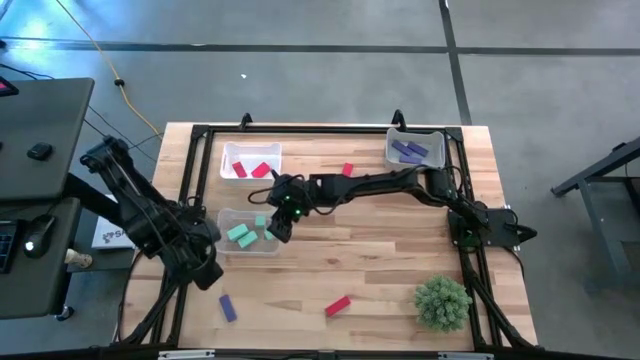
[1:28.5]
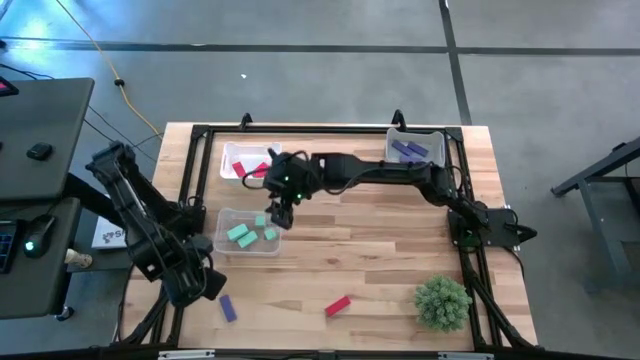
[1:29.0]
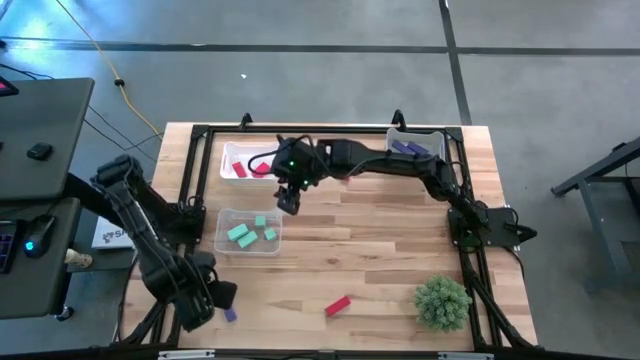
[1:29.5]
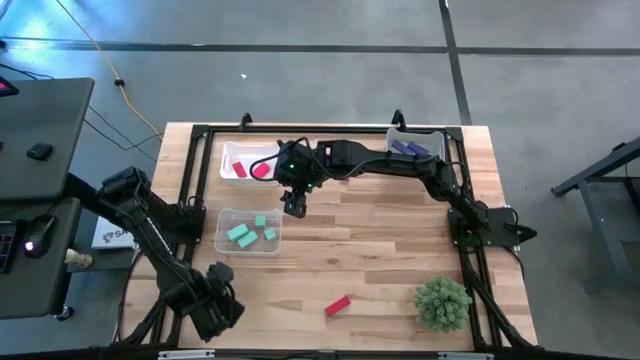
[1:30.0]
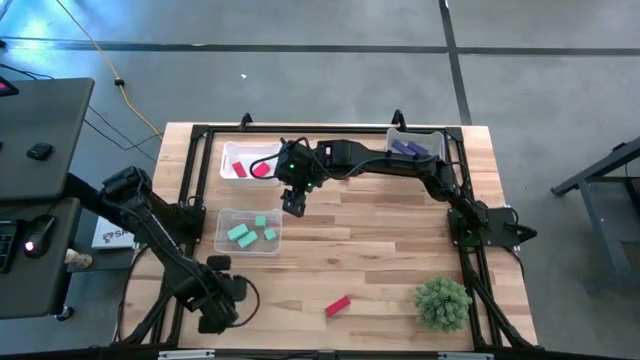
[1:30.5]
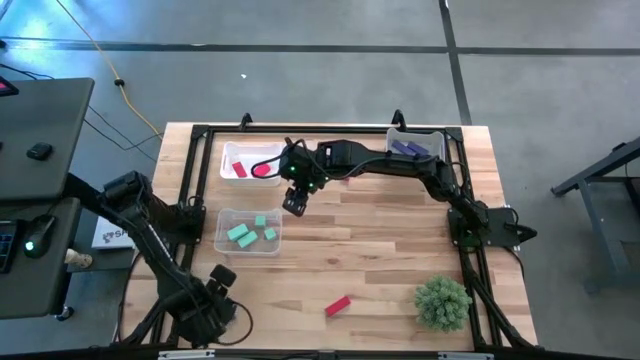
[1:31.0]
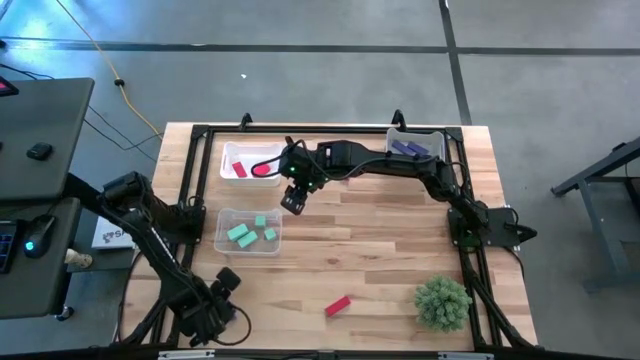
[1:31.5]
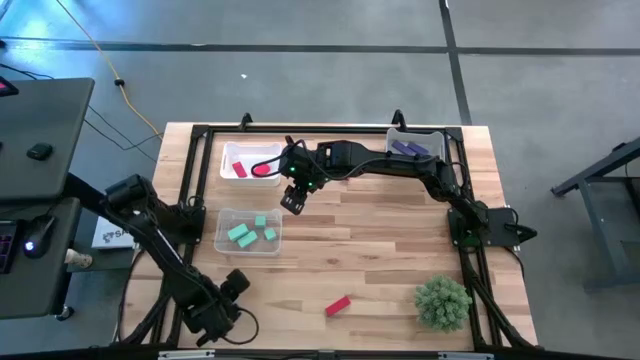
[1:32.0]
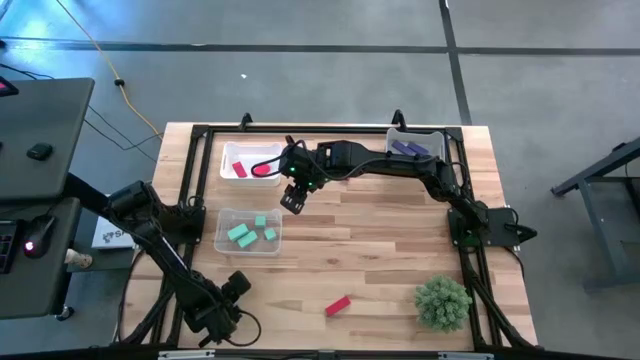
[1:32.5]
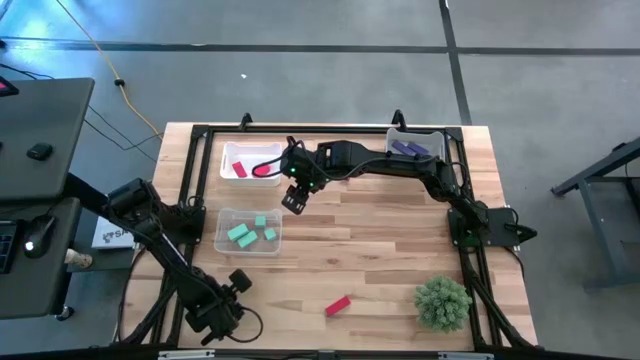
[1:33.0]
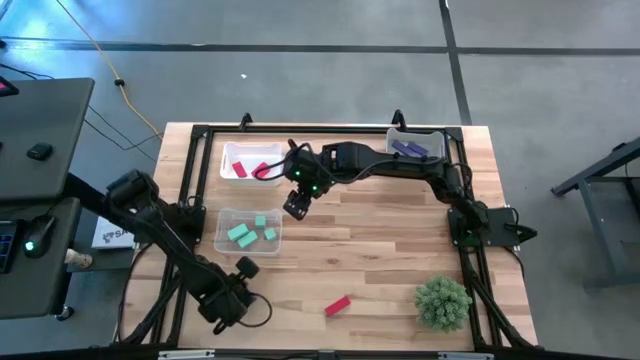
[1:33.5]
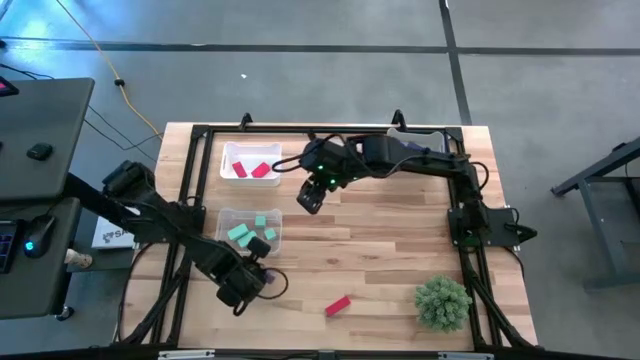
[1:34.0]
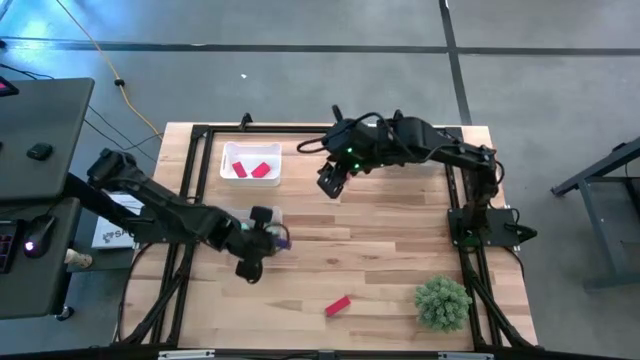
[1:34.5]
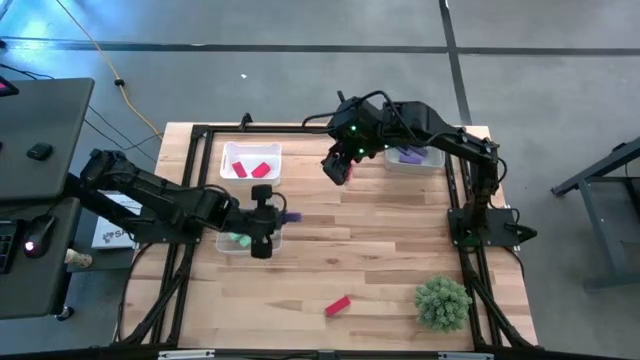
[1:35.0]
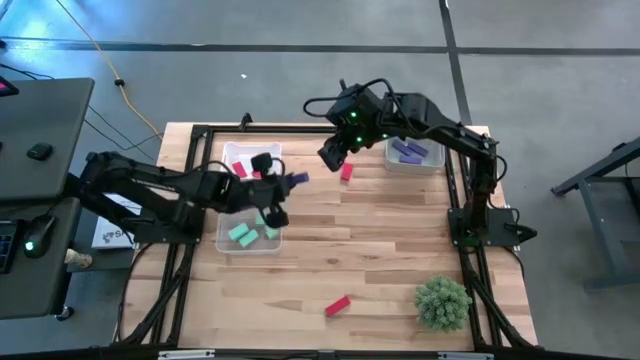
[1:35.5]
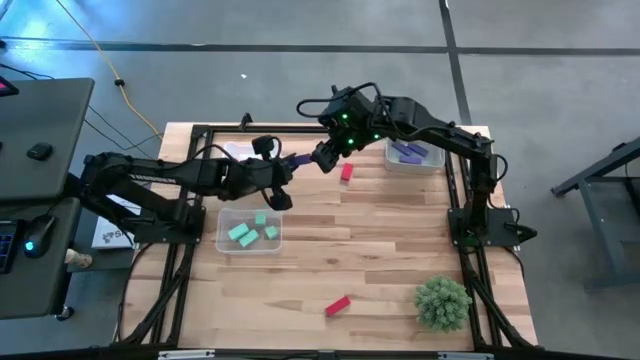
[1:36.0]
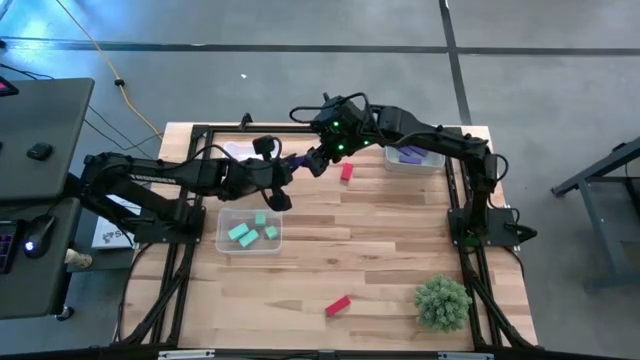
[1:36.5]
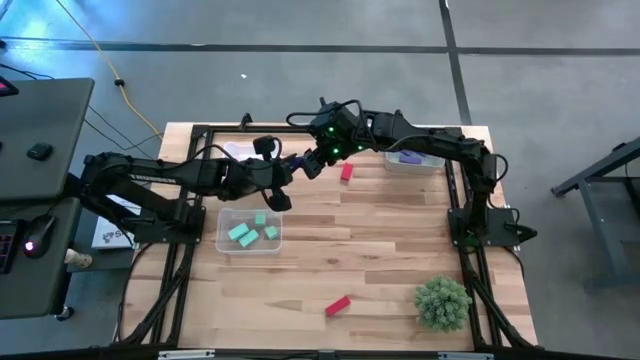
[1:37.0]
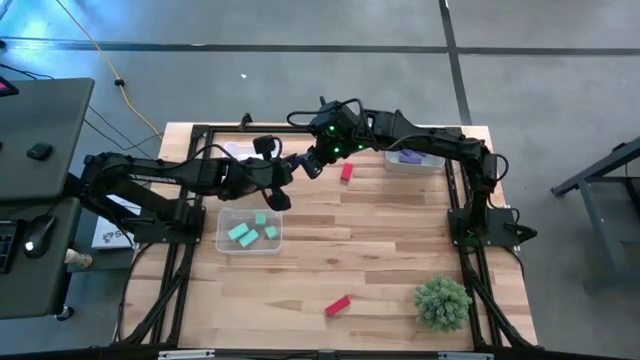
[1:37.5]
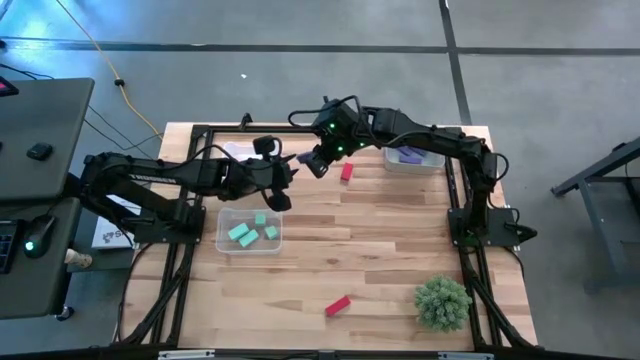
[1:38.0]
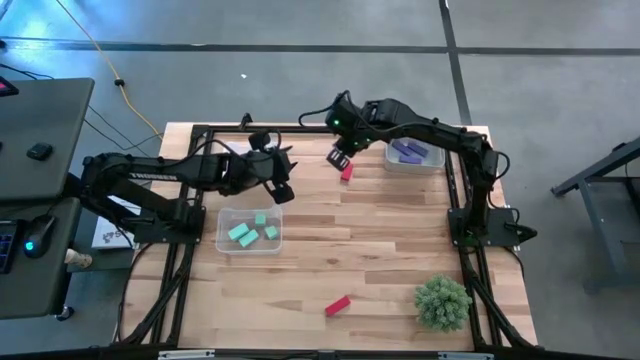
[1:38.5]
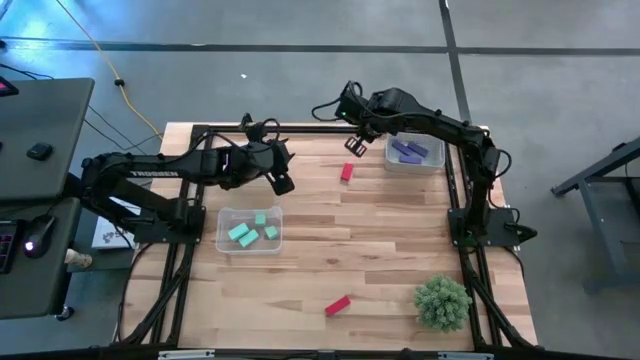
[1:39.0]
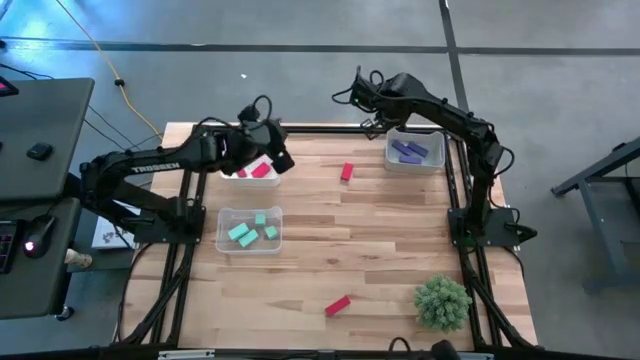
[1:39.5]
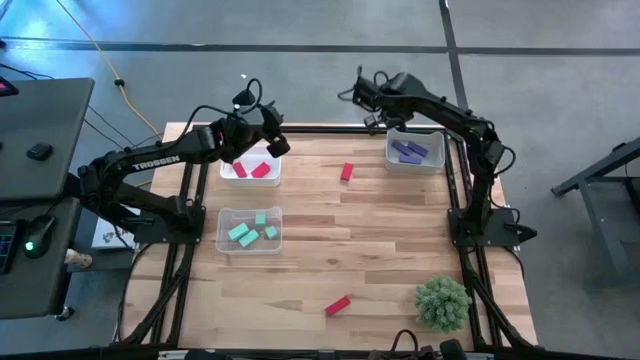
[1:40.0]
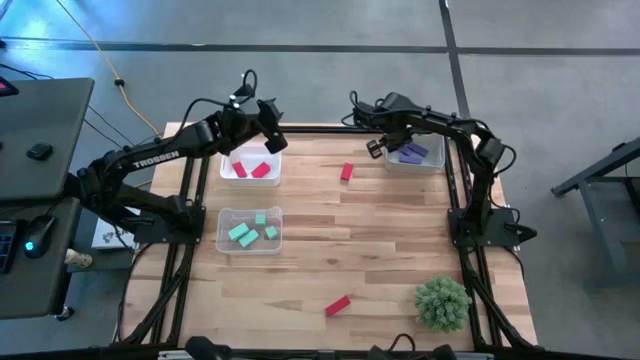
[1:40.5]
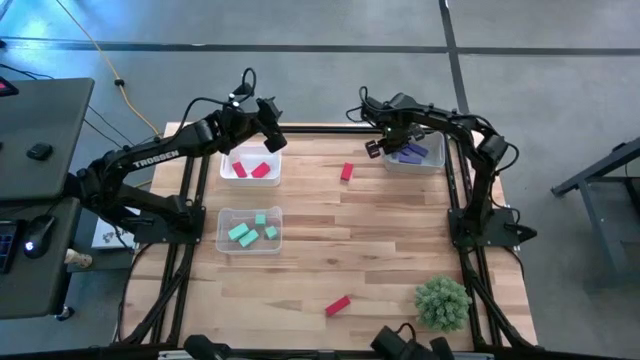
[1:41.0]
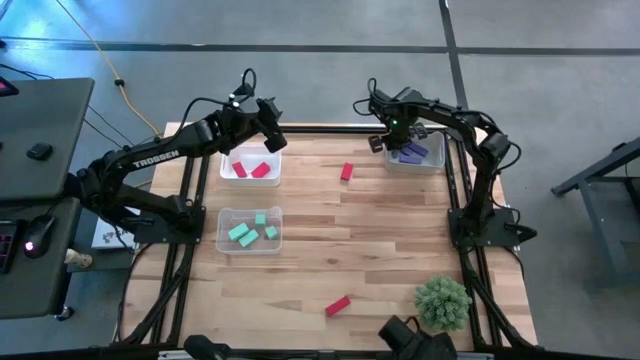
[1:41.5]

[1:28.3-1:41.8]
Task: Sort & place blocks by color
Put the violet block into the gray bin

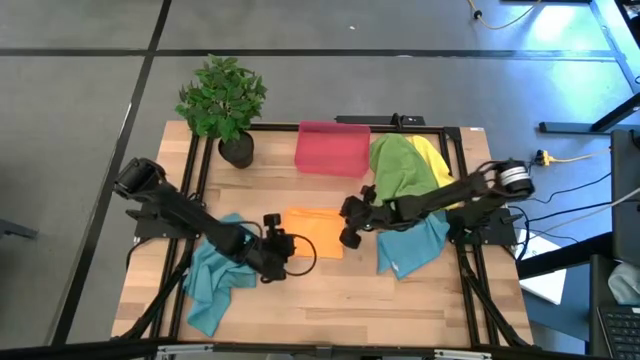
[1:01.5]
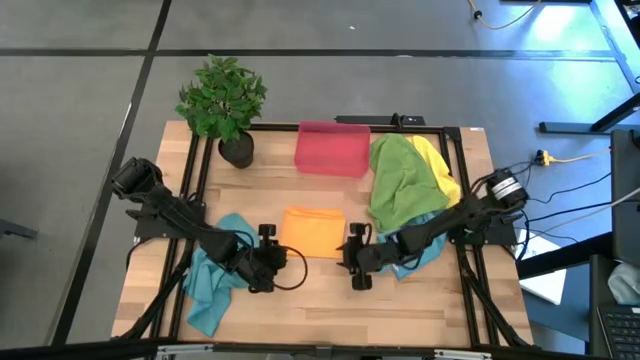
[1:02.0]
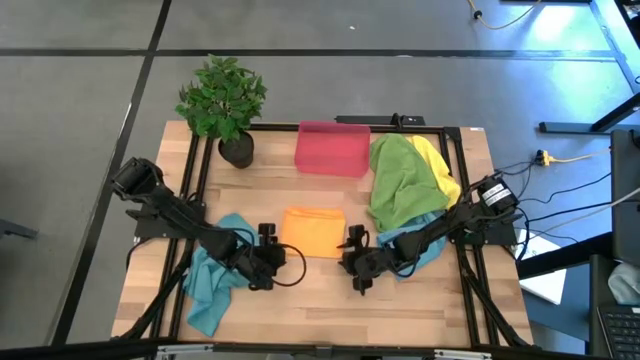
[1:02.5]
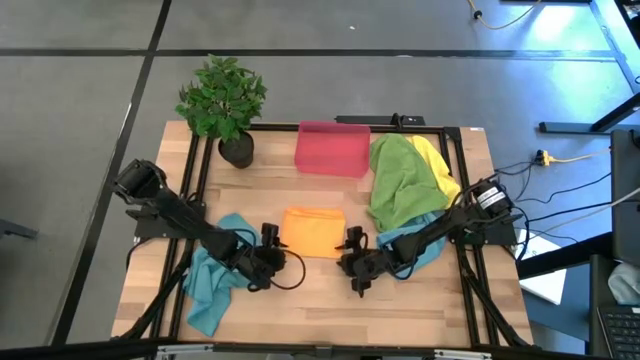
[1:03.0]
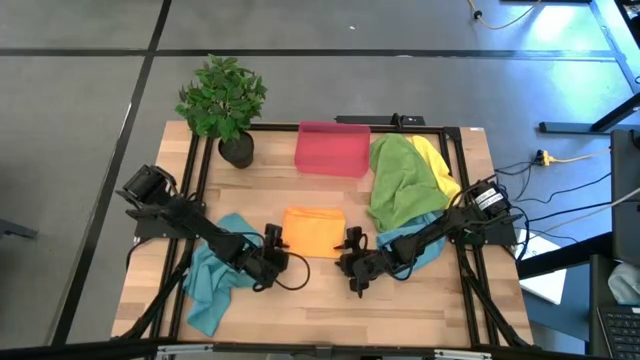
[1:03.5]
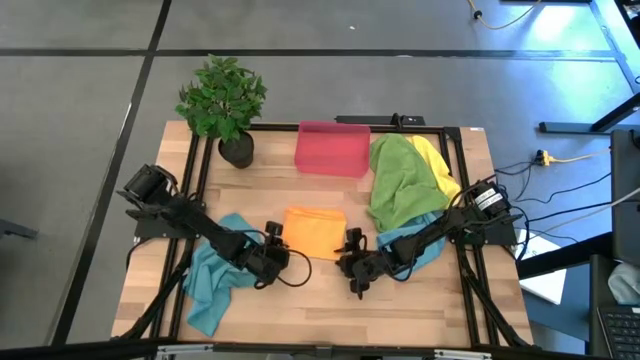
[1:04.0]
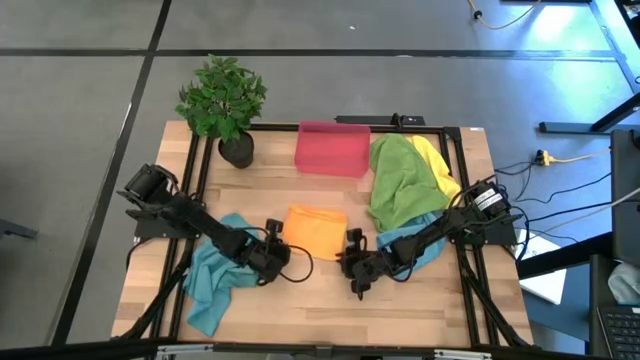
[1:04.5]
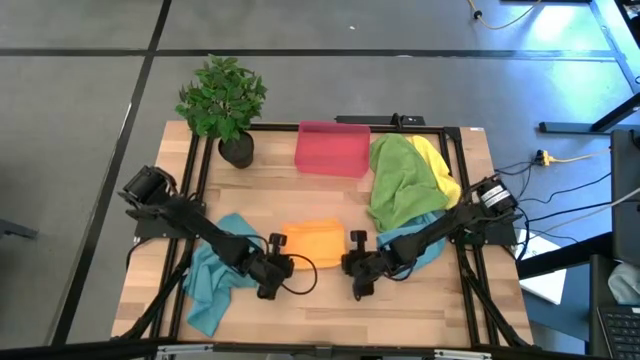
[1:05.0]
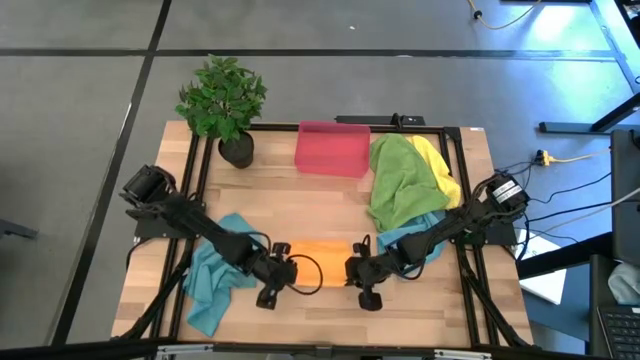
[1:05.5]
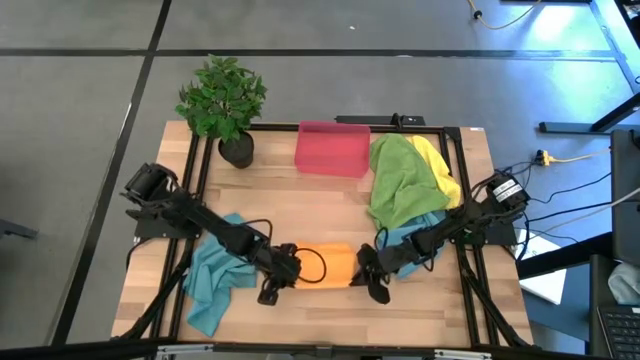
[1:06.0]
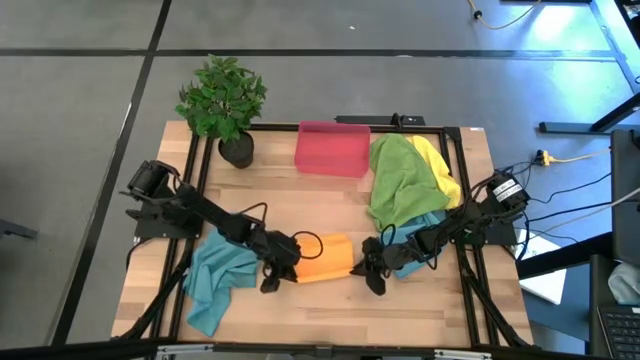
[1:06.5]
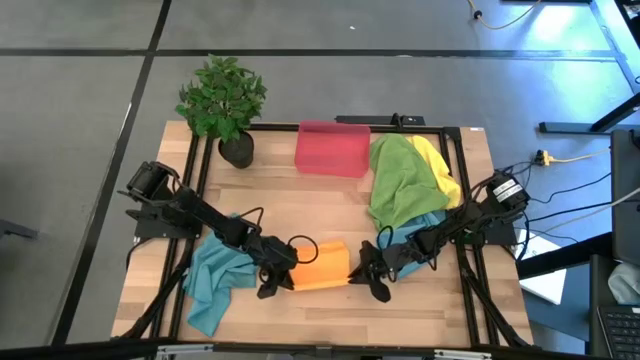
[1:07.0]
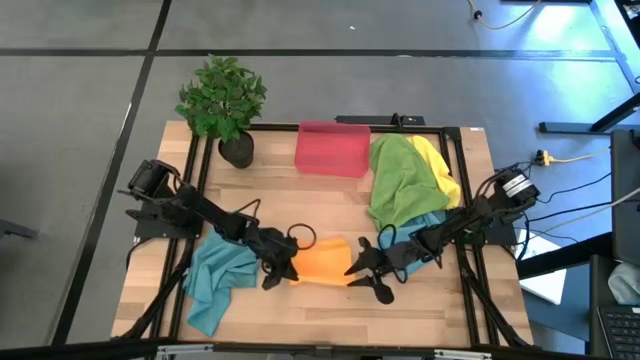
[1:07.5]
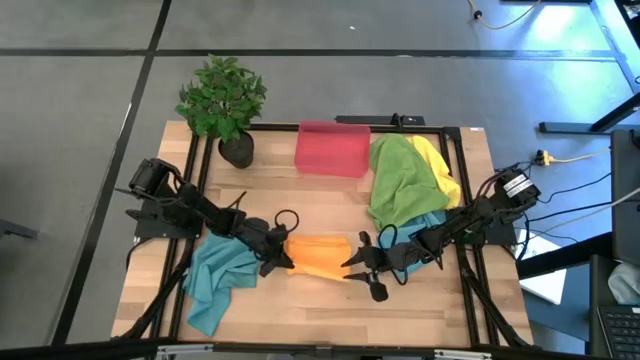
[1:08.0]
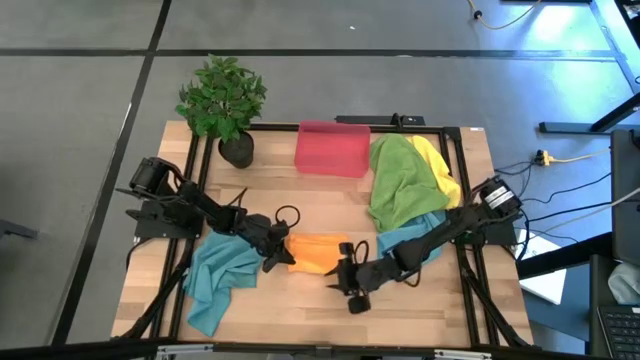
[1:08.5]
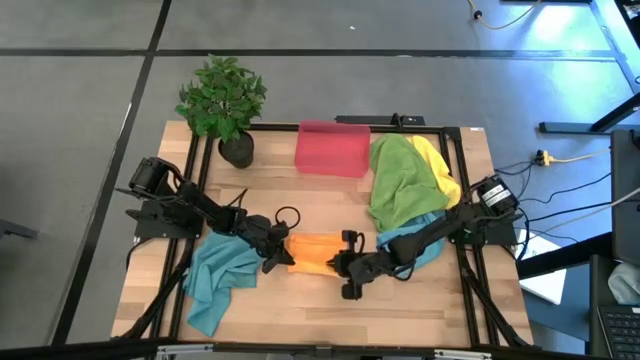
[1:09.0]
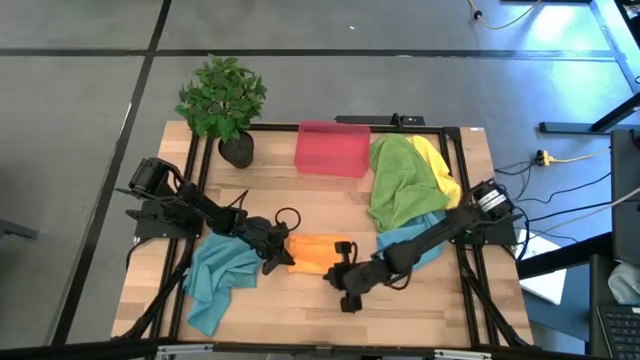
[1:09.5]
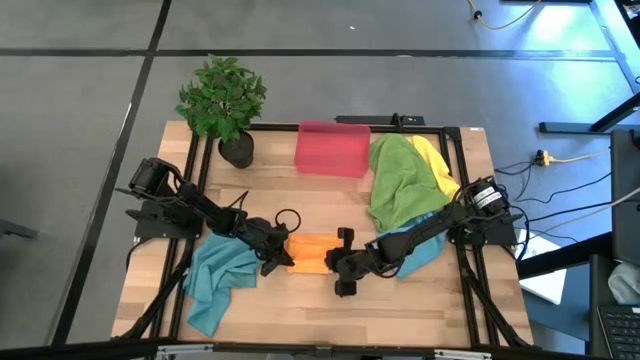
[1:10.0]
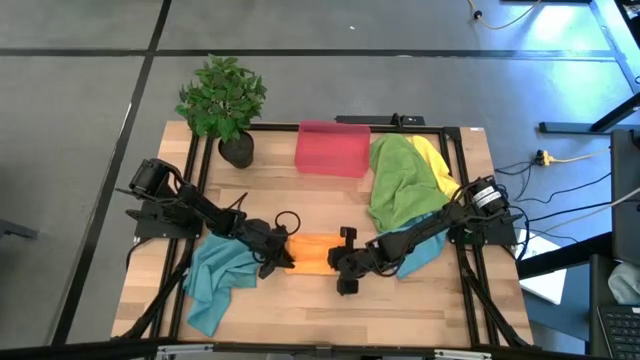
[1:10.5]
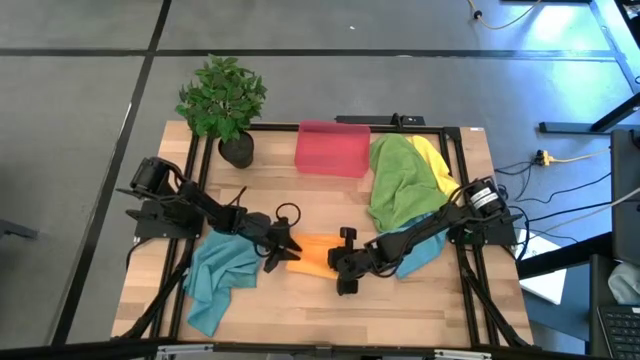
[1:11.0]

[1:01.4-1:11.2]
Task: Roll microfiber towels into tight, uniform cylinder then place into a basket
Roll the orange towel
